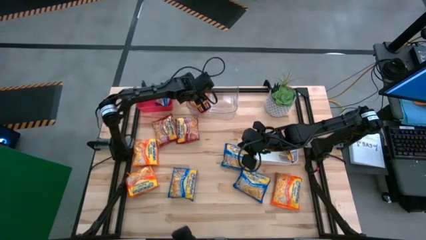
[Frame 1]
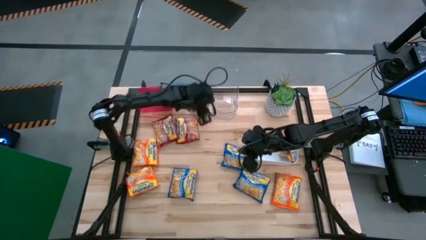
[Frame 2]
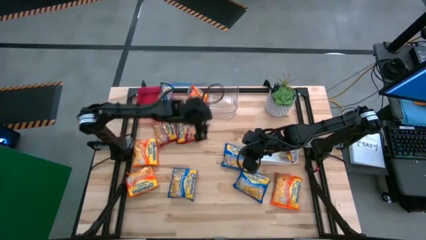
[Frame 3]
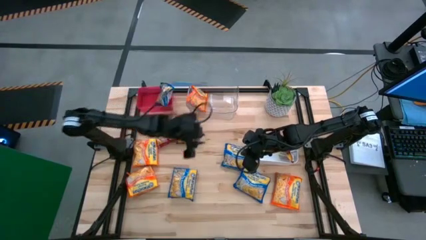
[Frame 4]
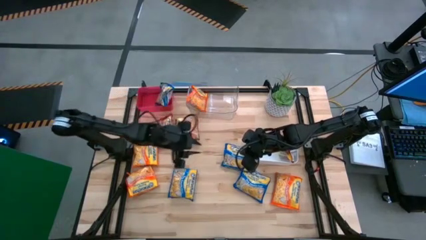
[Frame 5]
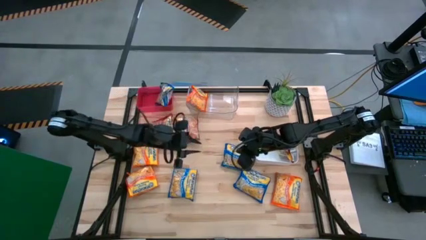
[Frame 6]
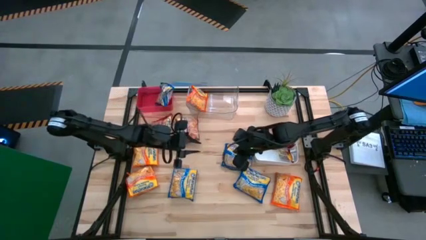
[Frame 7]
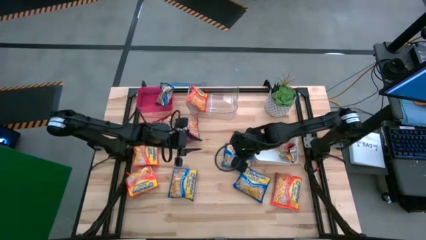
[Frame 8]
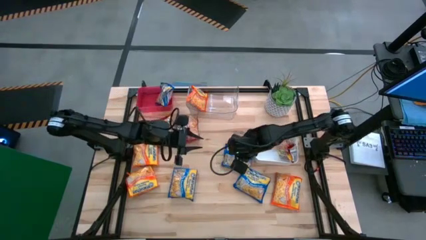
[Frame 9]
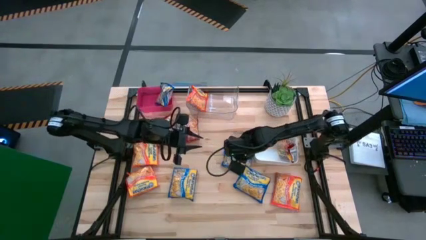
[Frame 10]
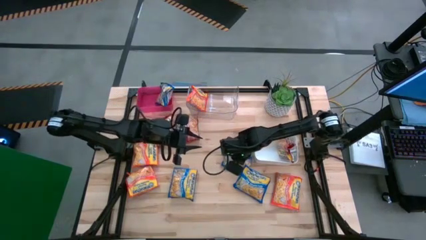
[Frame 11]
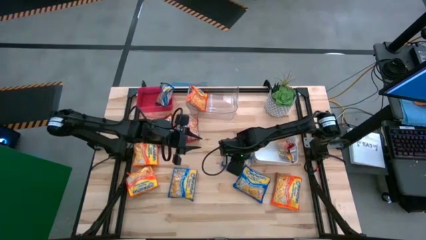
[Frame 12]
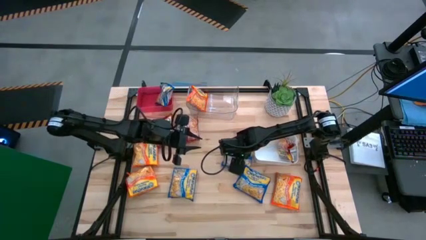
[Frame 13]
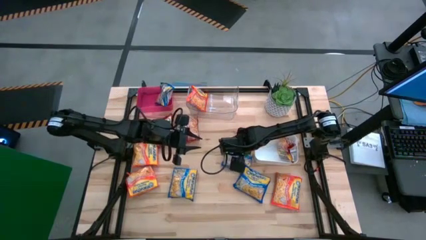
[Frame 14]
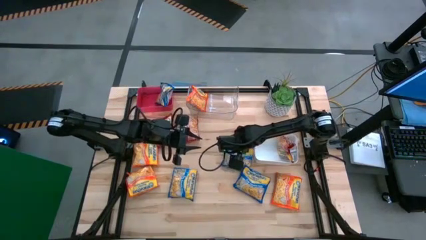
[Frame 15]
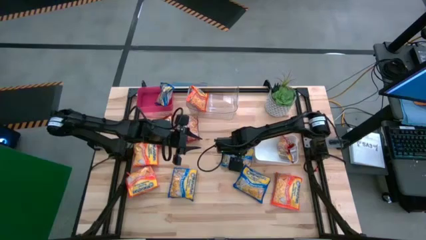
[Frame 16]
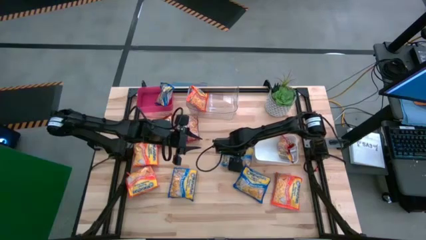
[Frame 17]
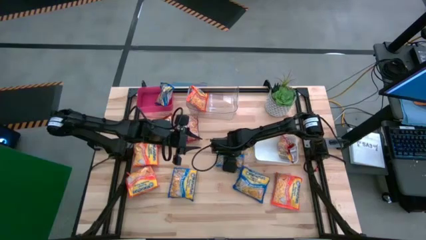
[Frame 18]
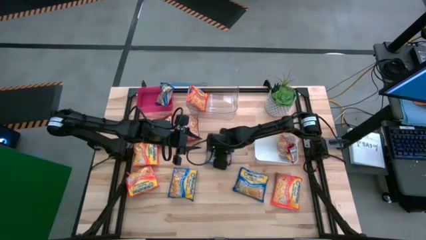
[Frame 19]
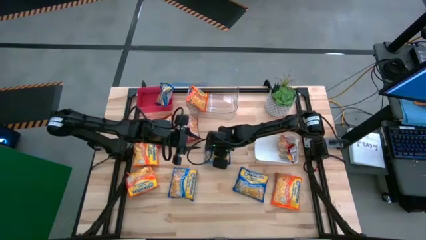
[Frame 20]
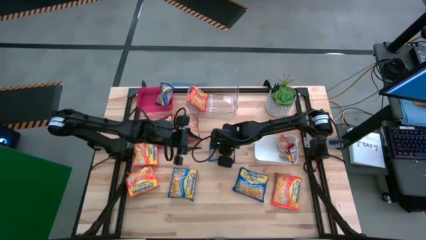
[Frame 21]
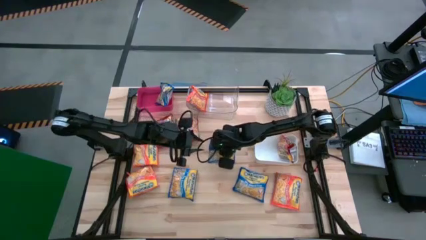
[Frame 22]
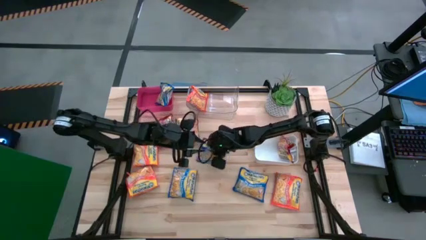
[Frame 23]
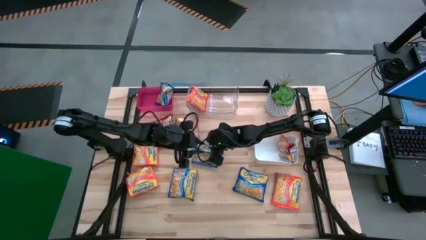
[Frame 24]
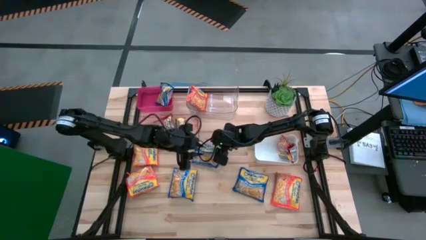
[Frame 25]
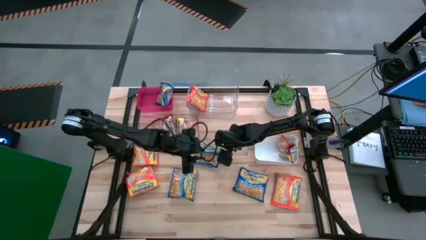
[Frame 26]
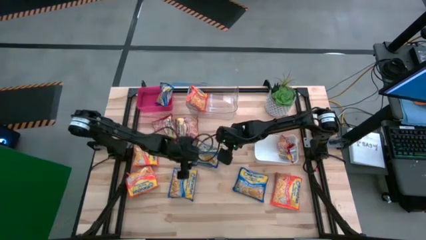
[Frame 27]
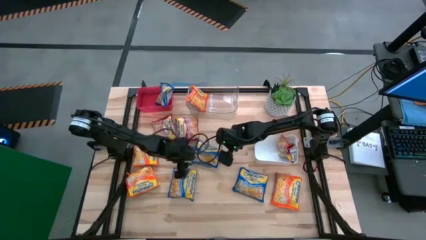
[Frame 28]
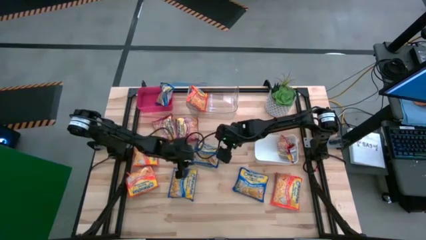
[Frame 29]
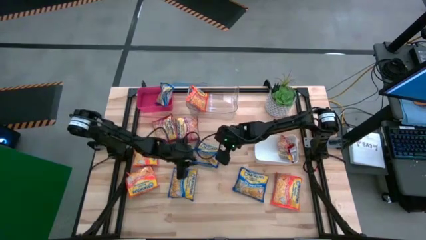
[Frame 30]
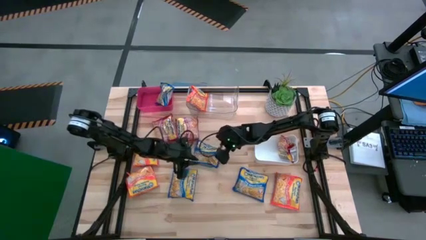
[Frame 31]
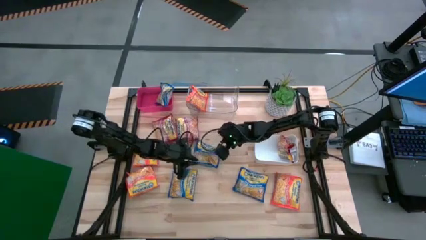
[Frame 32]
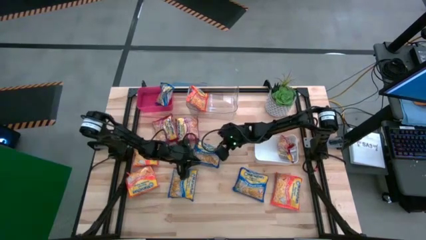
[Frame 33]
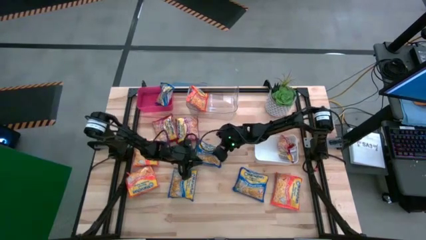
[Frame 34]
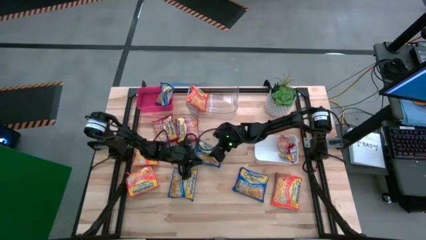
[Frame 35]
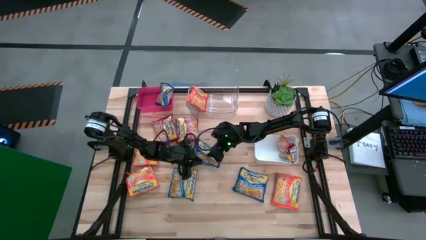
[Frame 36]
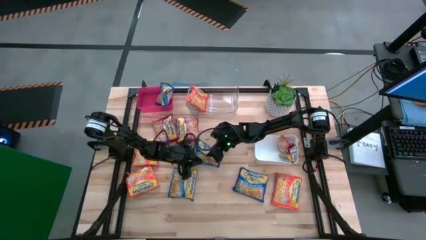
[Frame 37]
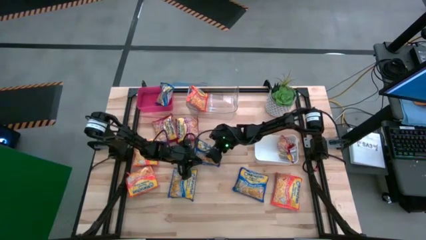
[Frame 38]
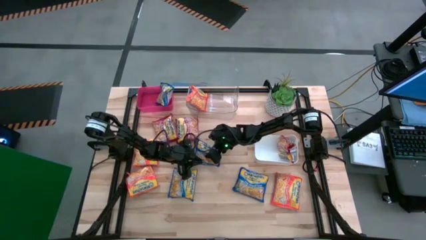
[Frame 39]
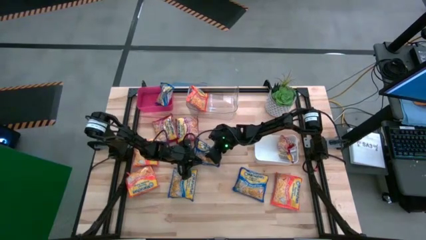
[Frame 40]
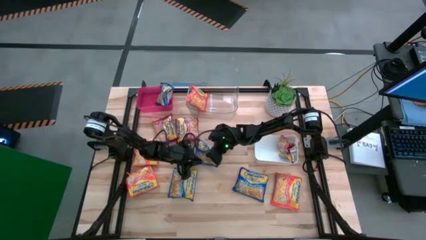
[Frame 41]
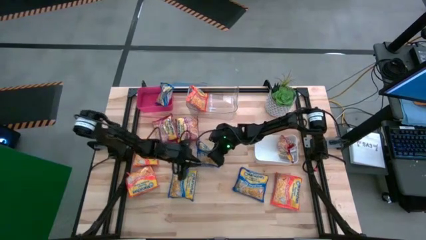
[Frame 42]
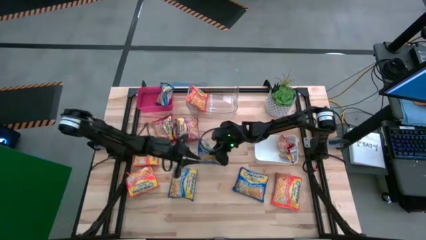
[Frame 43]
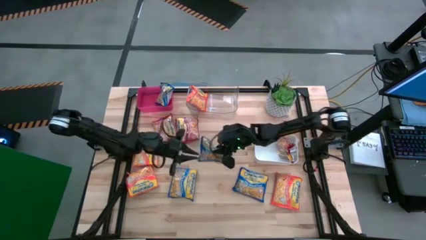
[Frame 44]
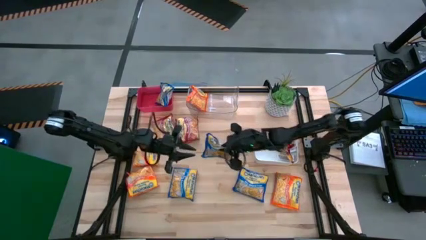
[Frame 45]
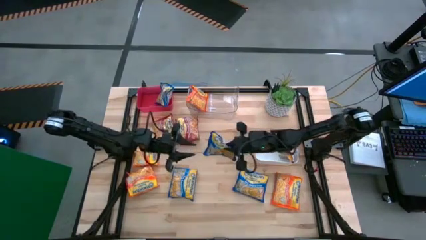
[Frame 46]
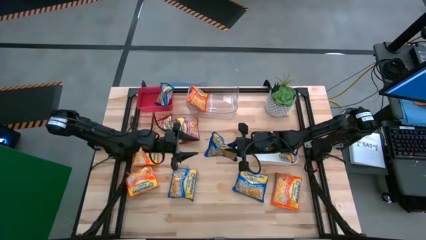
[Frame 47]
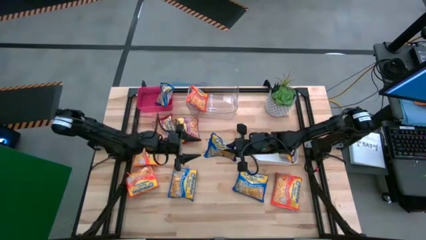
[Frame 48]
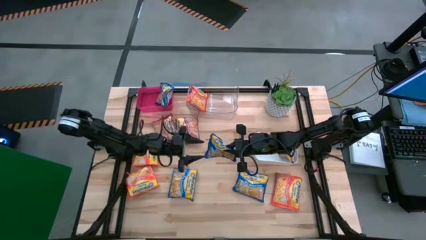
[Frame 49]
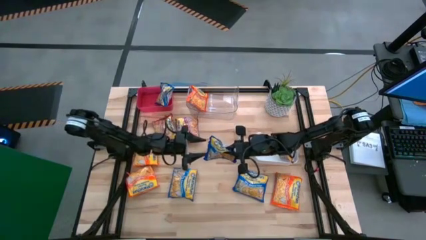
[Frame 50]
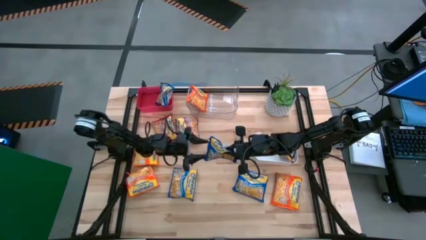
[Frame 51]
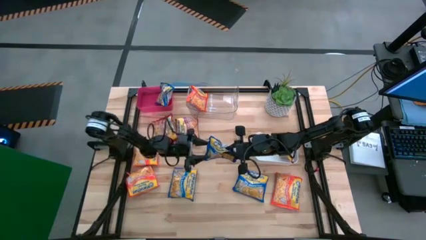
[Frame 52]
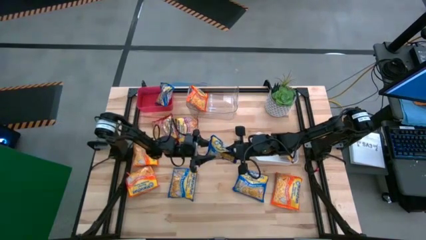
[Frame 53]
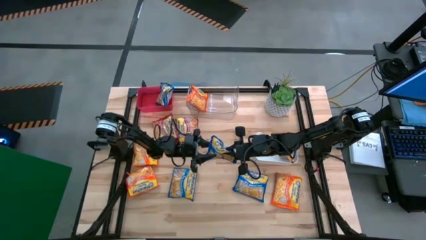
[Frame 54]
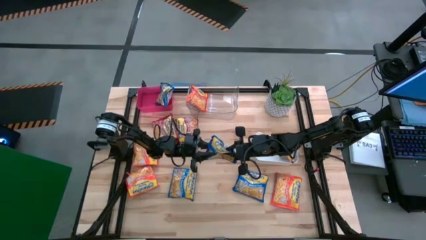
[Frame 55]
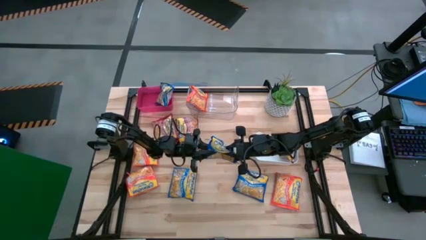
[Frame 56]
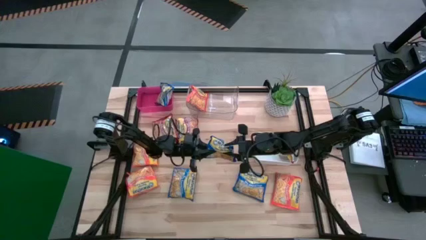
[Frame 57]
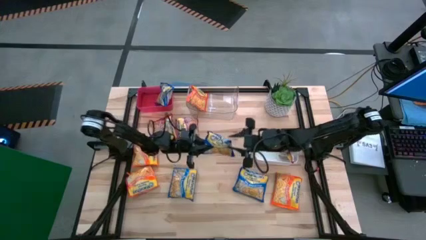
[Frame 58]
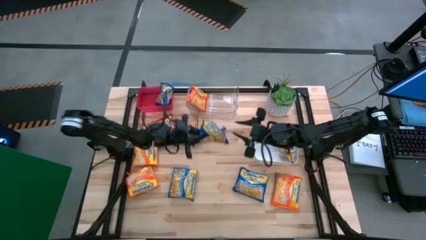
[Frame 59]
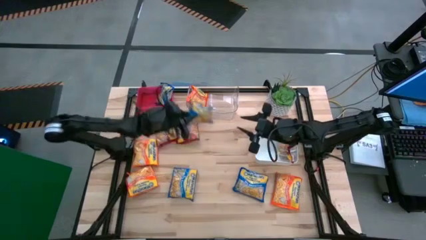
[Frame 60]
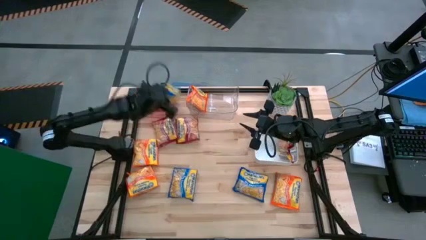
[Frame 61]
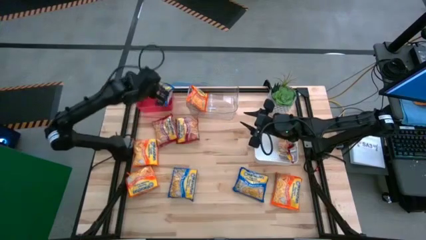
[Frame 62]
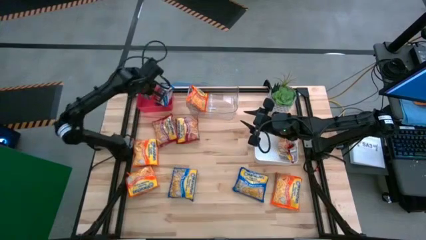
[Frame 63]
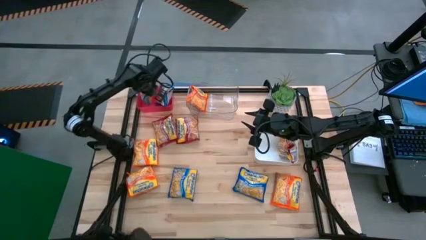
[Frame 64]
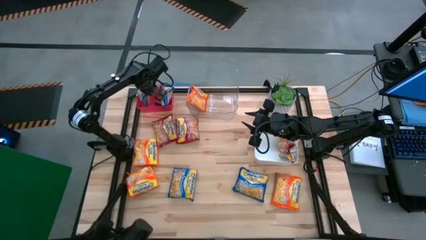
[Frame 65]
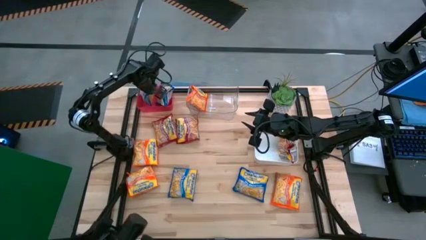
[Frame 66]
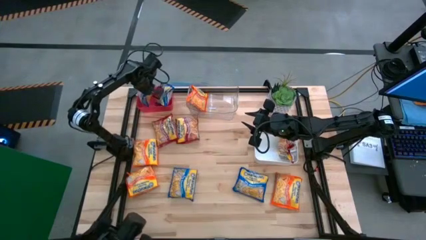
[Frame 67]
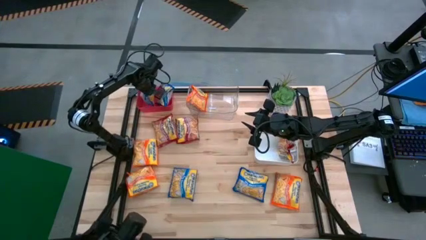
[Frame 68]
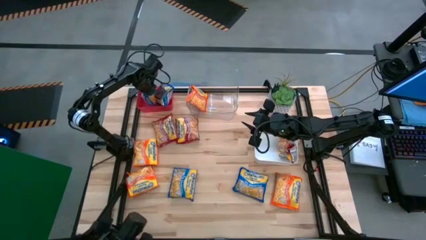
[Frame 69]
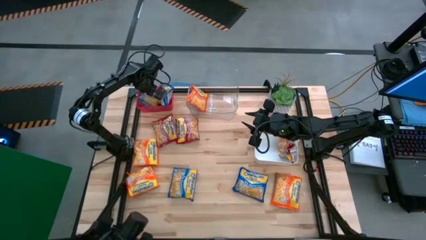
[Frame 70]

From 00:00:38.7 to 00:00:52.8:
Task: Sort Maruchan noodles
Put the blue noodle pack into the red bin
